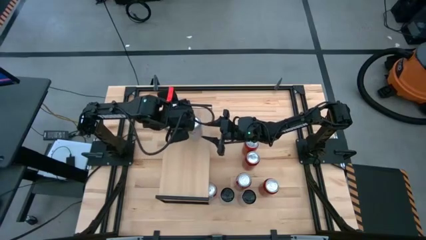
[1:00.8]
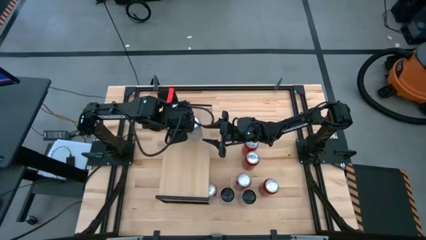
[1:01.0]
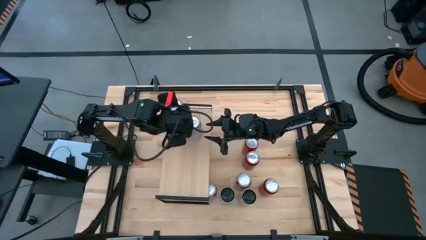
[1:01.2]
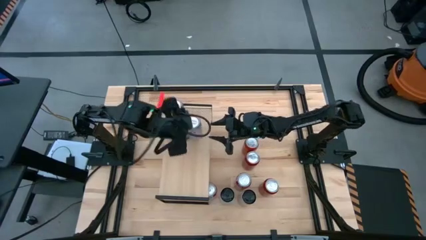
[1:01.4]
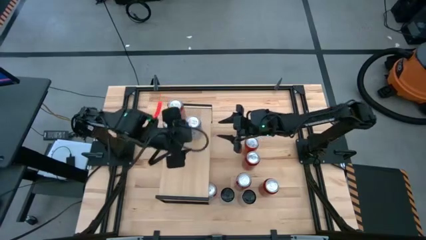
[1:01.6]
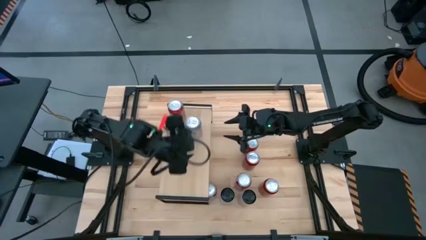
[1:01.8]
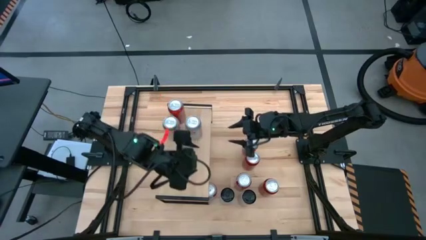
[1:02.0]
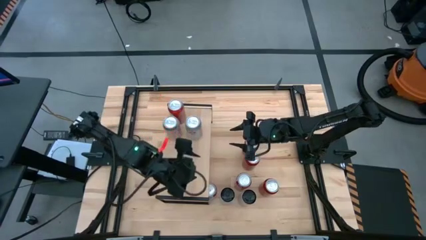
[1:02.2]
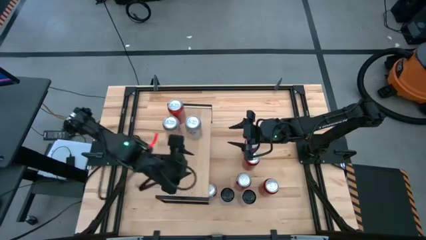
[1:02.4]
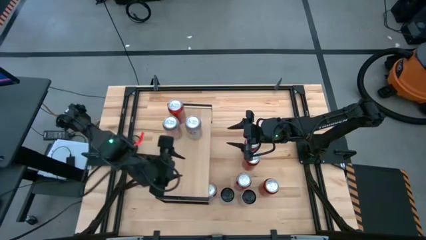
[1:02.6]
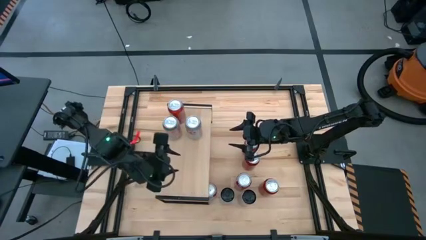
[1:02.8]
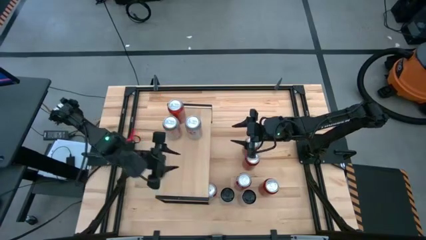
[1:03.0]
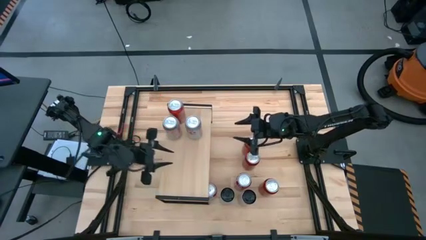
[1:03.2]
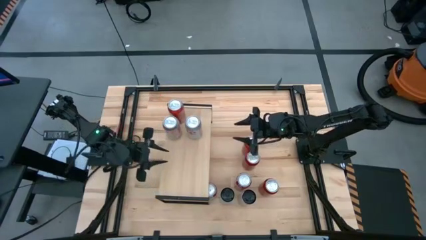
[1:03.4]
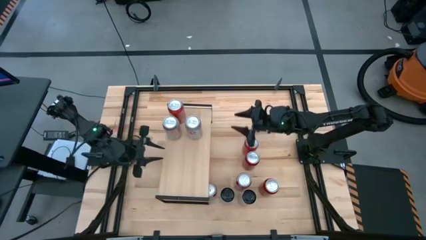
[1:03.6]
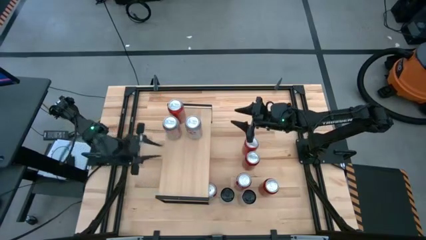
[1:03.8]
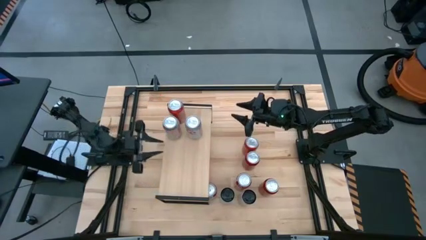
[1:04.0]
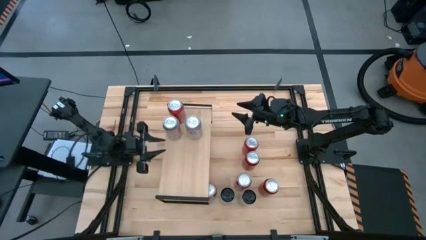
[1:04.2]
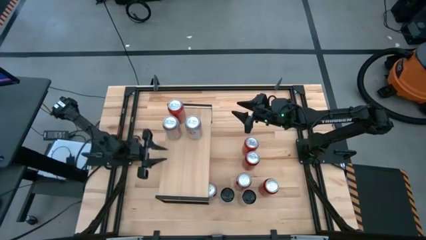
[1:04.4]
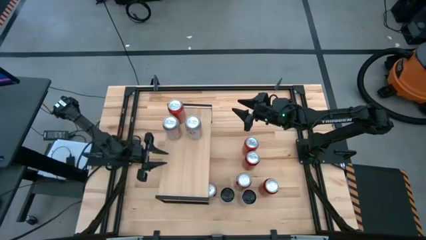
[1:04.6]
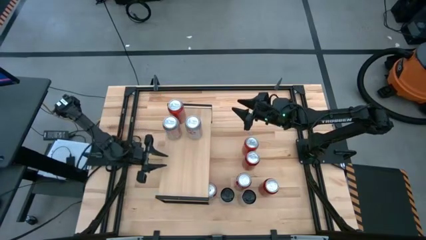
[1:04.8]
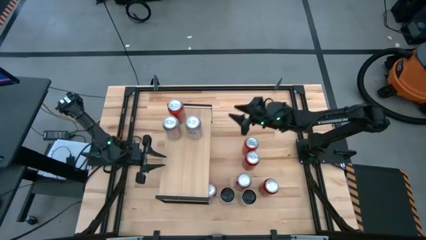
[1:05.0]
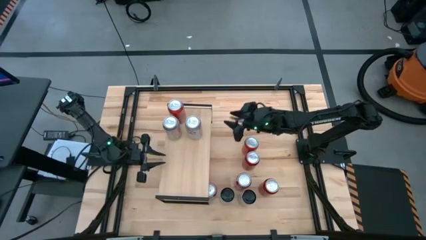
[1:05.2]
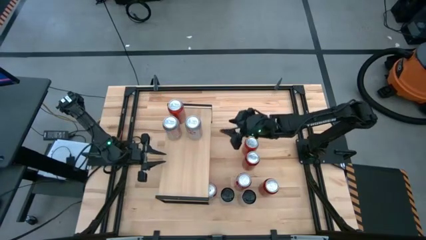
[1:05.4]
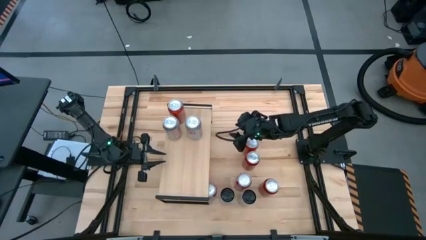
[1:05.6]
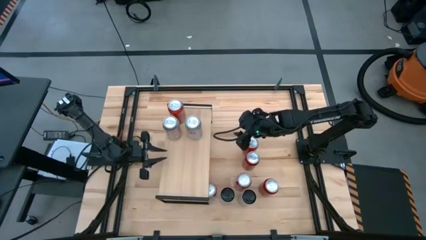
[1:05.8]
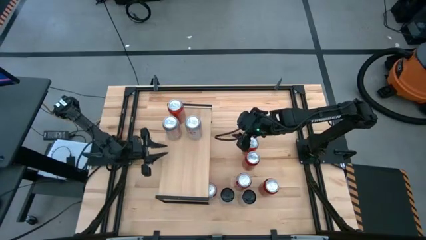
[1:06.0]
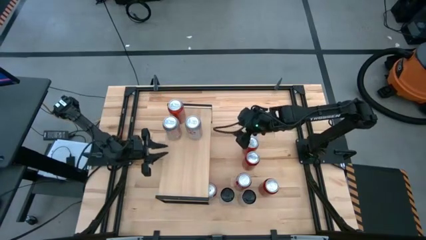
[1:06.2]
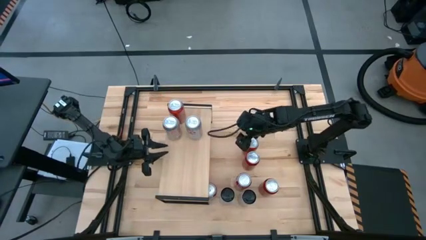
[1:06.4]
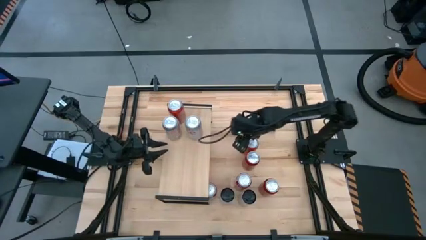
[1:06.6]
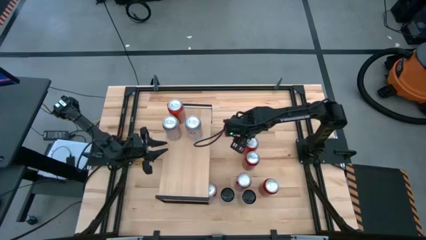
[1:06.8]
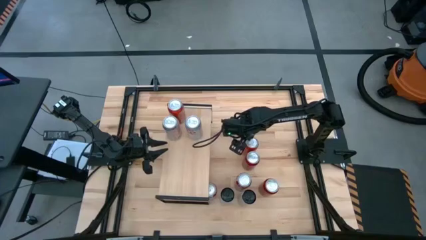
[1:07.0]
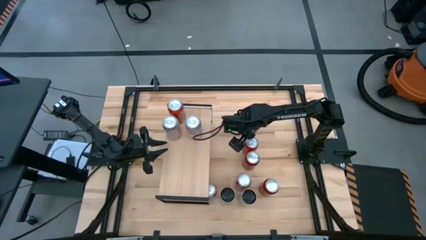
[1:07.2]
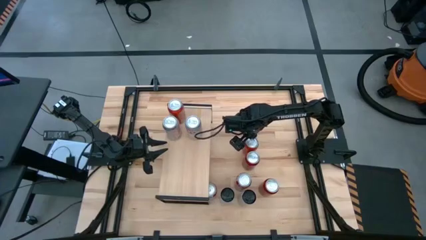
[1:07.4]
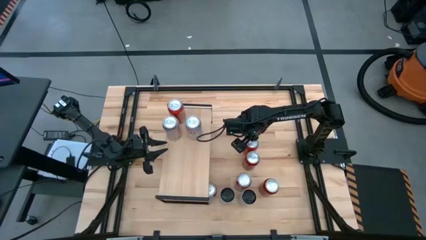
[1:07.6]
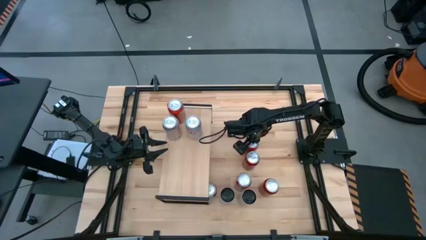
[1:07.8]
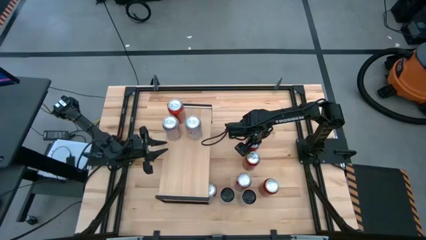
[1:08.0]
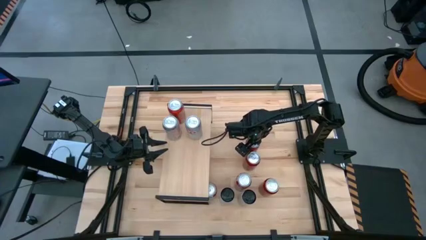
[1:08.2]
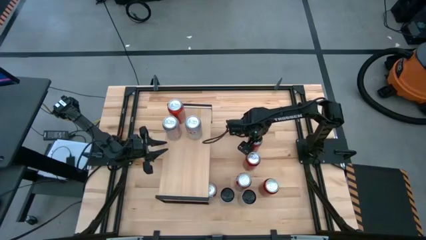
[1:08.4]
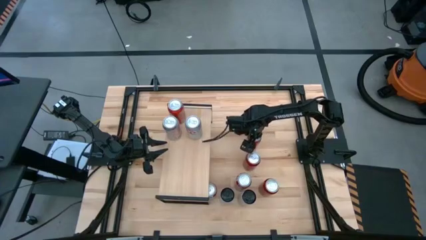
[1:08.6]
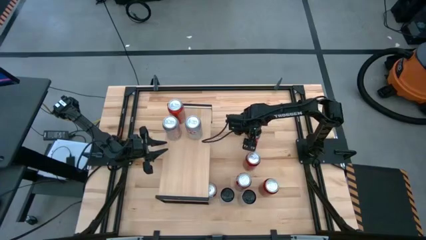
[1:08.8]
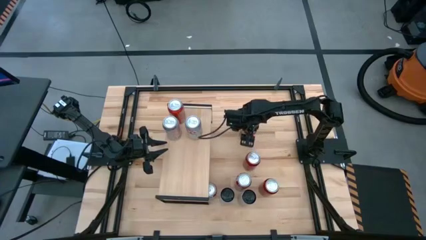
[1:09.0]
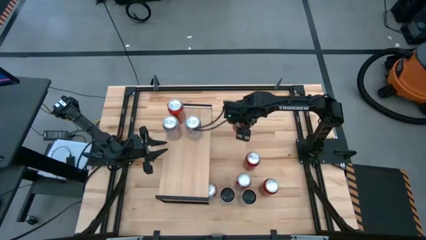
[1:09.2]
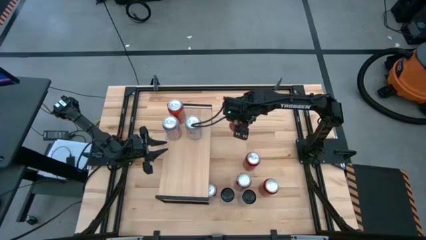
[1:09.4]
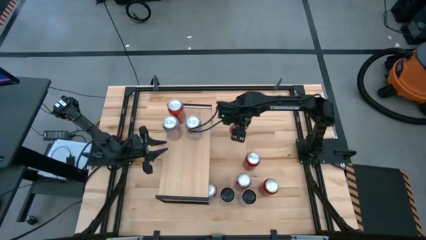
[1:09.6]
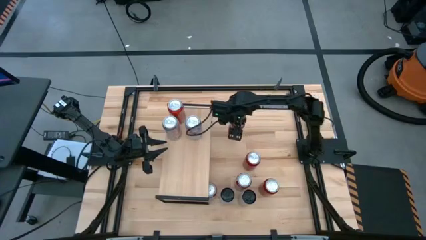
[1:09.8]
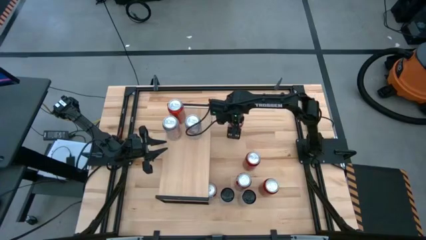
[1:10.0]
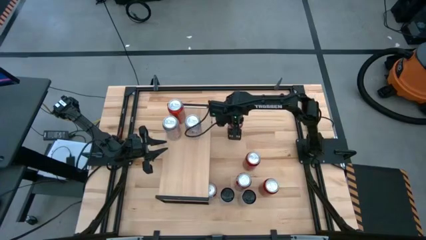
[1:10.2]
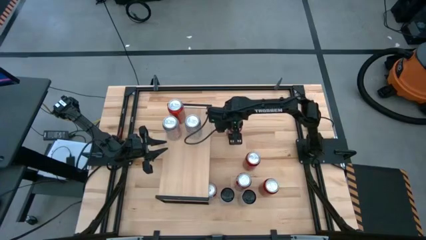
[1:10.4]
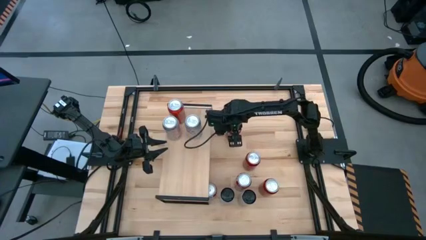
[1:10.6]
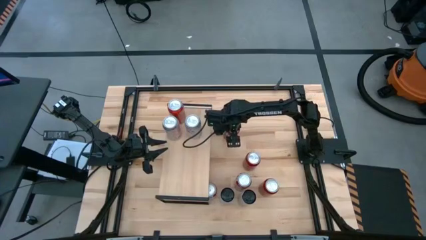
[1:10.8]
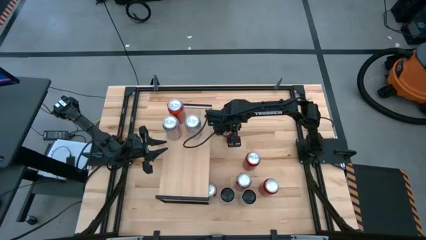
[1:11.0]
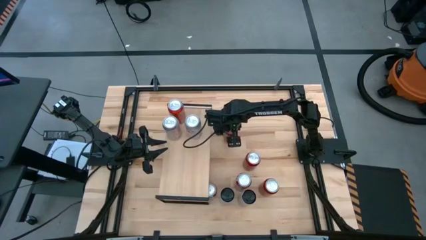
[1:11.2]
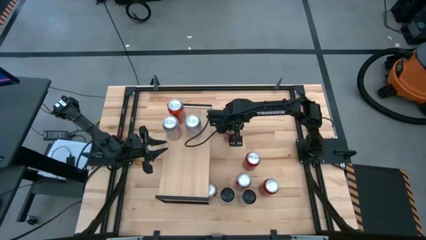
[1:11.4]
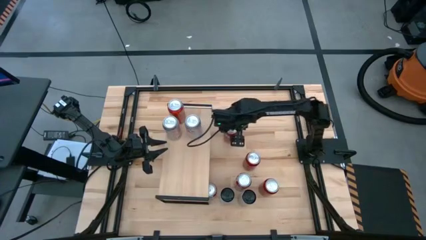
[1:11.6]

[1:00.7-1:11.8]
Task: Place canned beverage on shelf
Put the orange soda can on the shelf aligned with the other orange soda can
